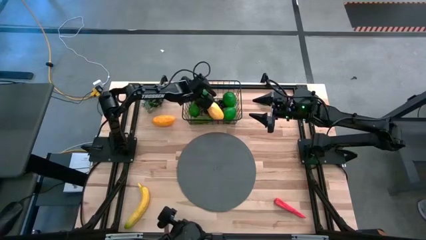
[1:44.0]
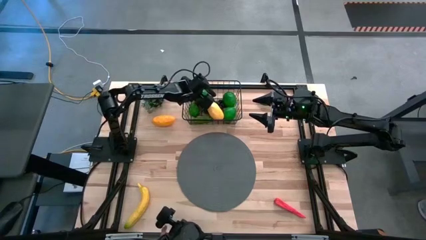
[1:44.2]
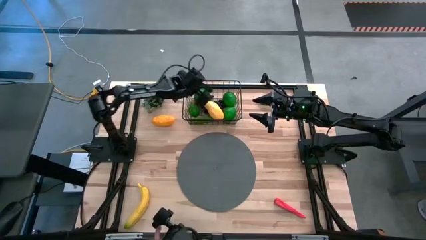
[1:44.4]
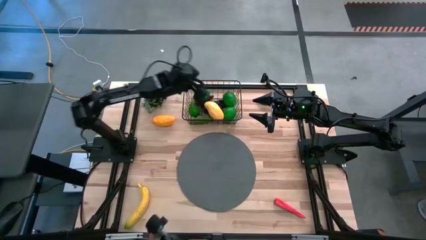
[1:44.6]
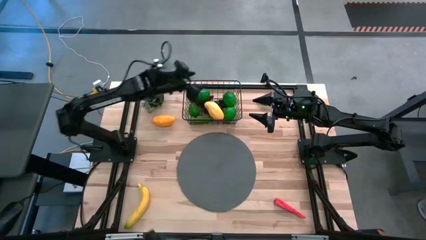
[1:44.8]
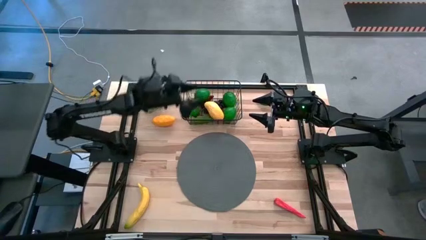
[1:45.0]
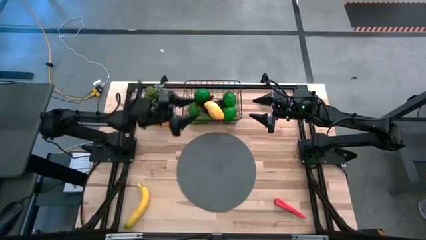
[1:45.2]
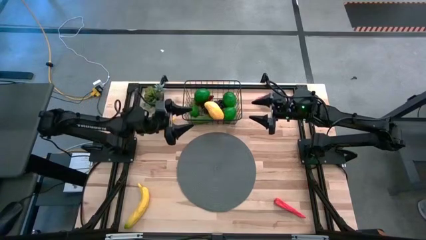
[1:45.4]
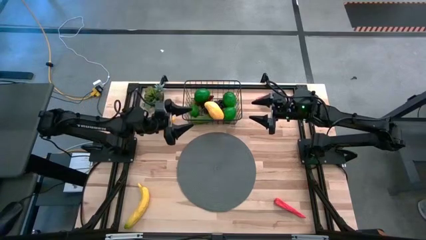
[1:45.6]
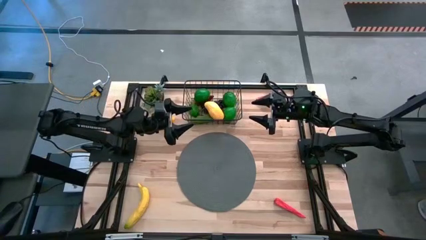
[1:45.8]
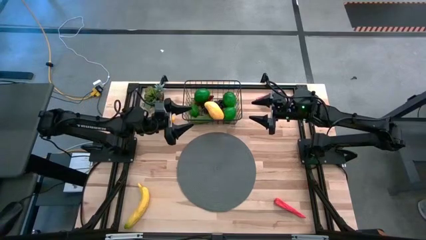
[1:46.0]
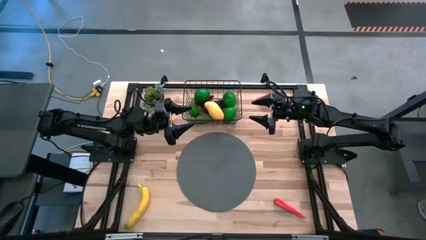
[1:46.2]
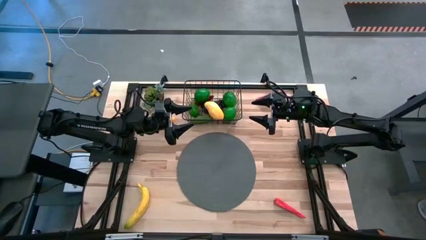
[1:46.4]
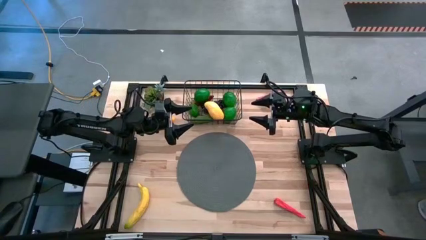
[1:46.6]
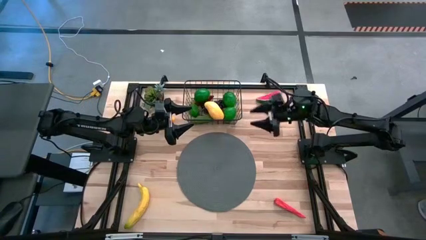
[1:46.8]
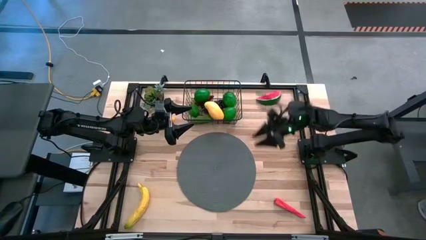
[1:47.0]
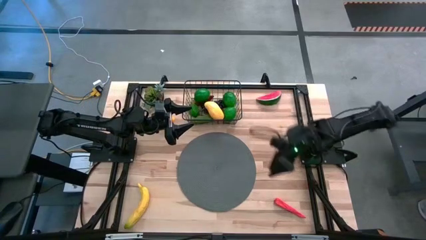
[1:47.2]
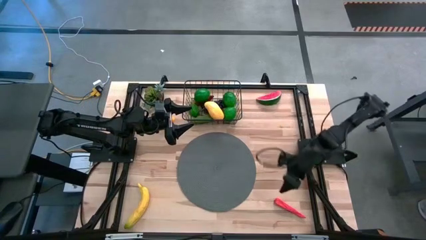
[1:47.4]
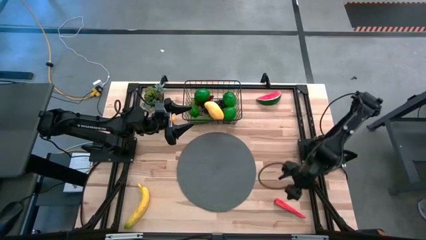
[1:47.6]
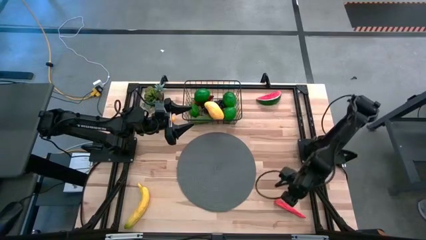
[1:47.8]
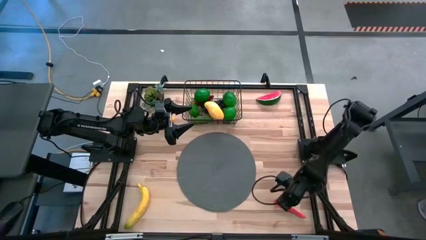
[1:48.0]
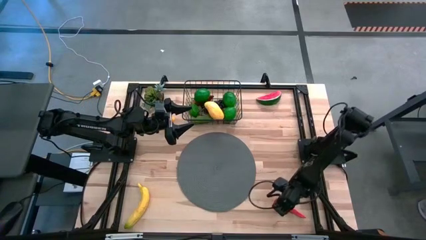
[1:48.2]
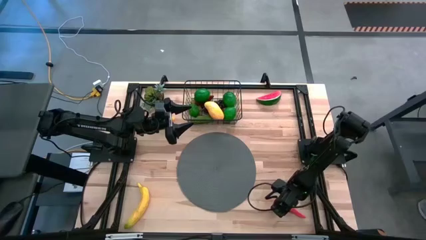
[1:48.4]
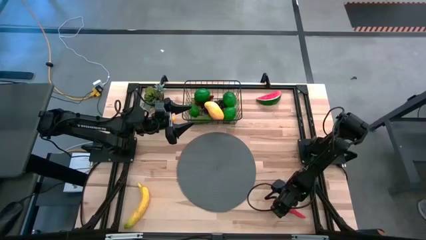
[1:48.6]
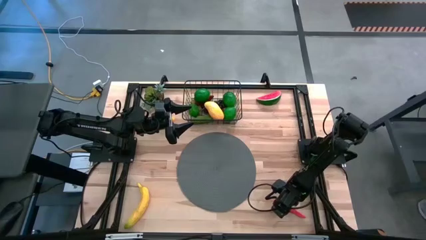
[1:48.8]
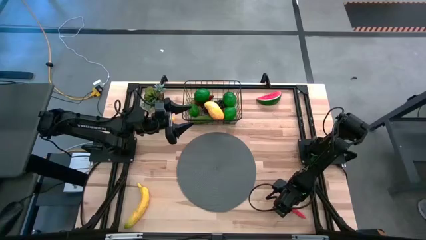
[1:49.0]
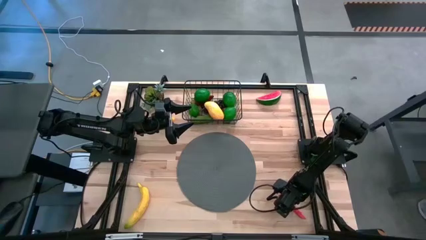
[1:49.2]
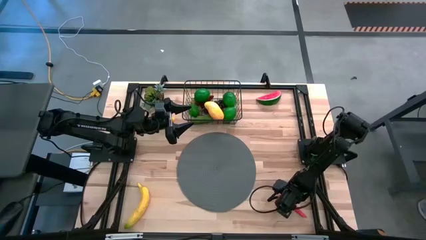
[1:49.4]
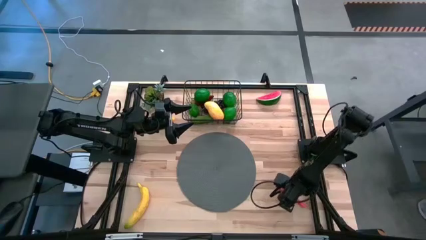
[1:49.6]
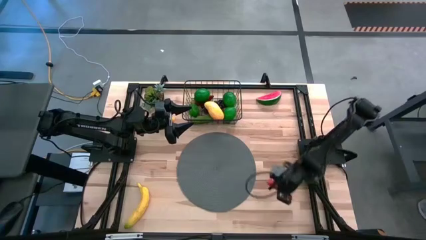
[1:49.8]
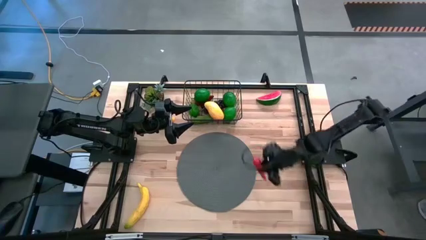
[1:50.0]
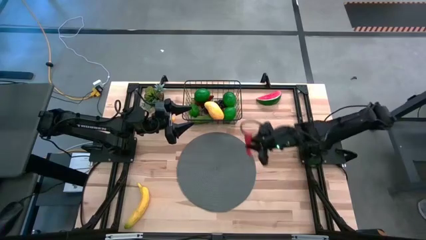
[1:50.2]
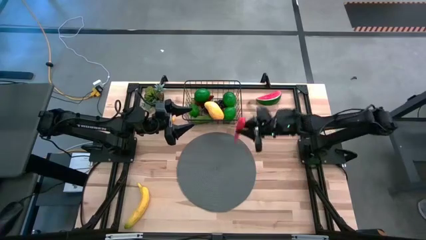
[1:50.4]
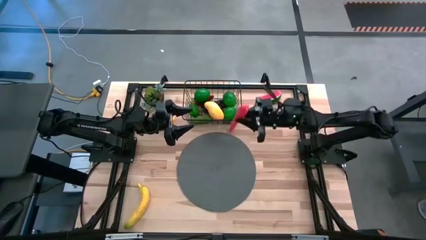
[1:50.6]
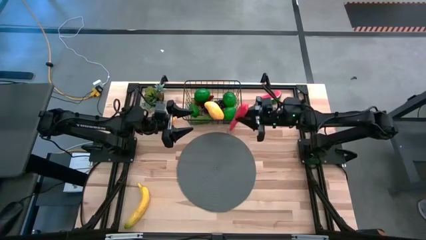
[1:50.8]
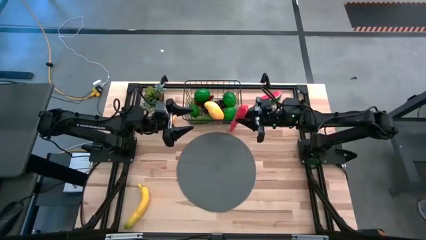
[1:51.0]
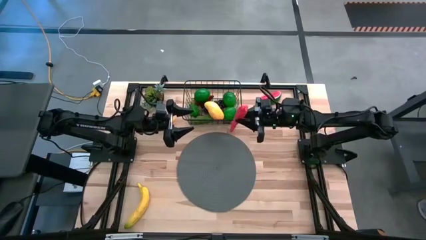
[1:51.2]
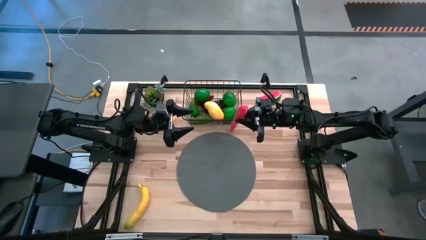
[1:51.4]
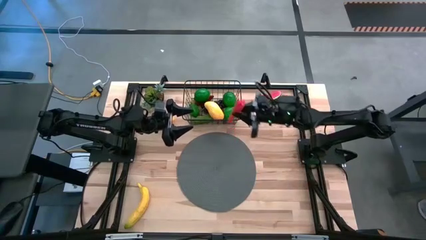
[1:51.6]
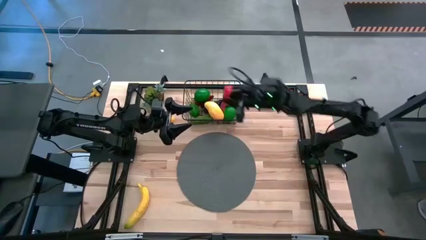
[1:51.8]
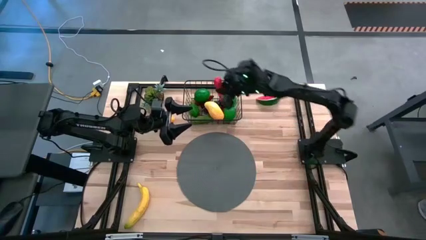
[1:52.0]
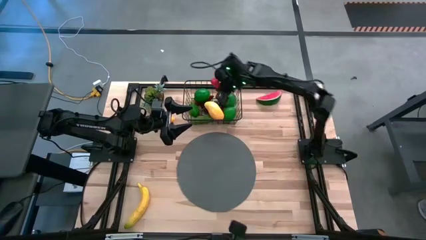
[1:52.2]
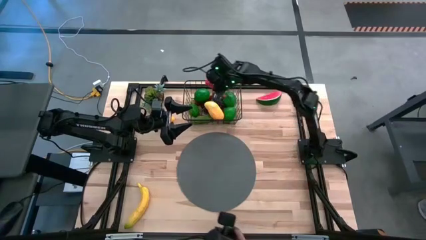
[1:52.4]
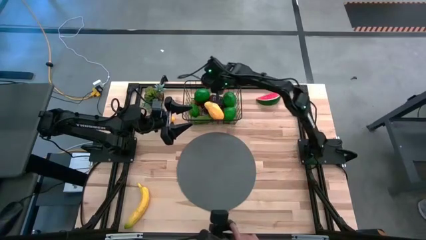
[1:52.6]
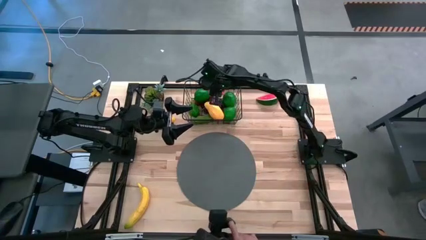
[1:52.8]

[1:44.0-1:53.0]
Task: Build produce basket
Put the orange carrot into the black wire basket

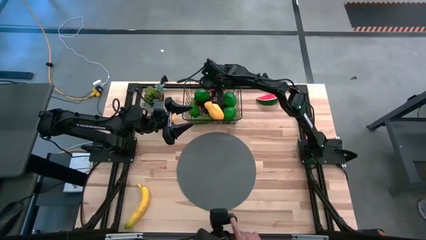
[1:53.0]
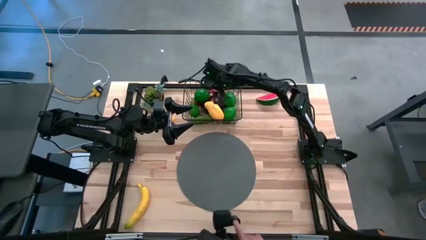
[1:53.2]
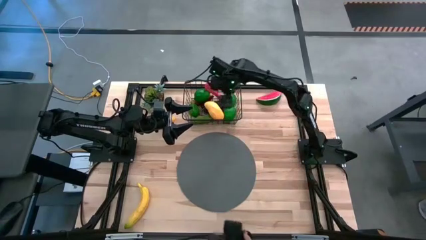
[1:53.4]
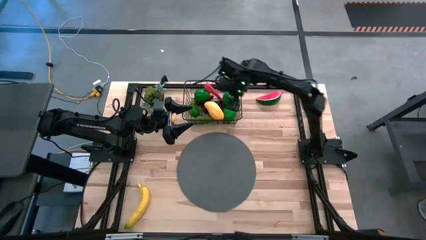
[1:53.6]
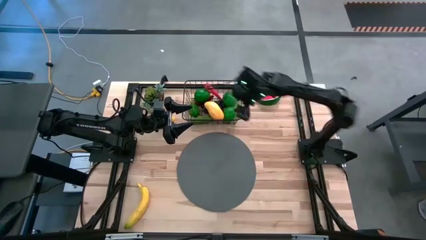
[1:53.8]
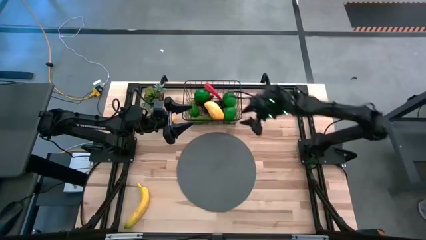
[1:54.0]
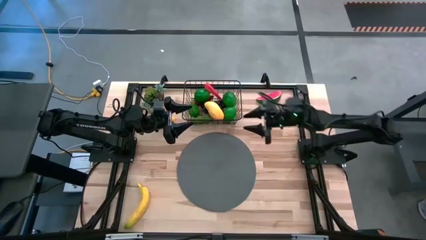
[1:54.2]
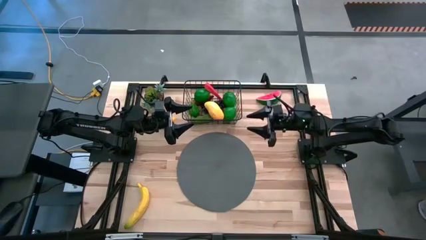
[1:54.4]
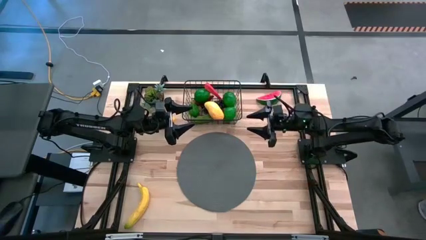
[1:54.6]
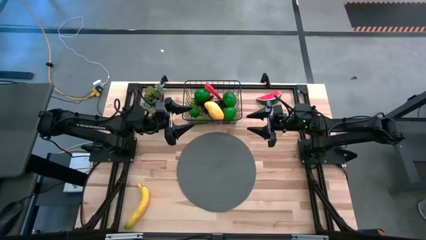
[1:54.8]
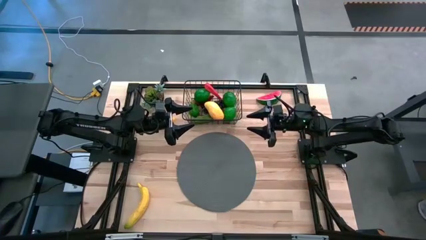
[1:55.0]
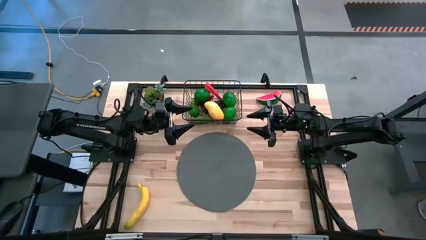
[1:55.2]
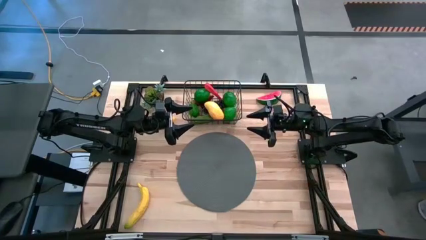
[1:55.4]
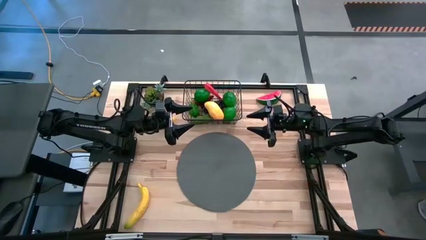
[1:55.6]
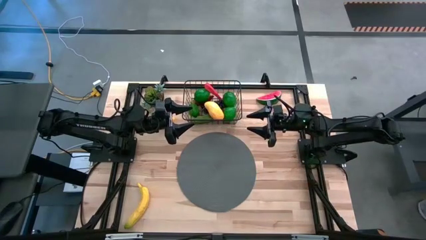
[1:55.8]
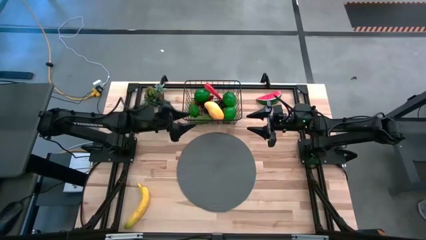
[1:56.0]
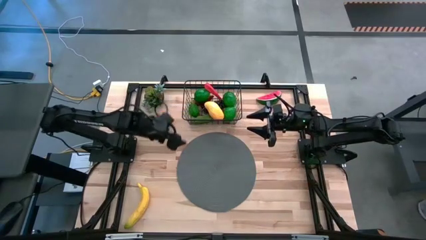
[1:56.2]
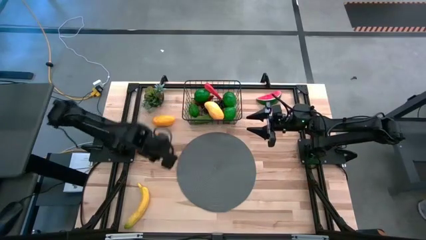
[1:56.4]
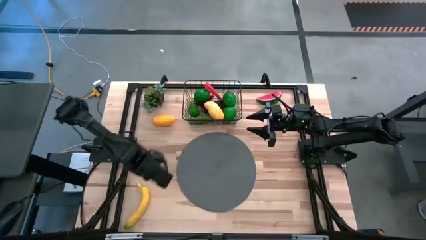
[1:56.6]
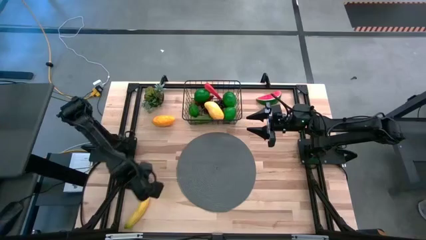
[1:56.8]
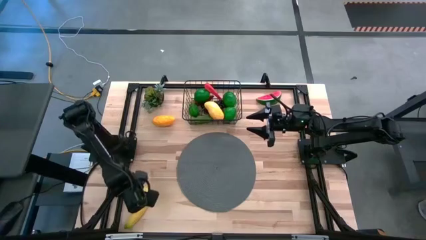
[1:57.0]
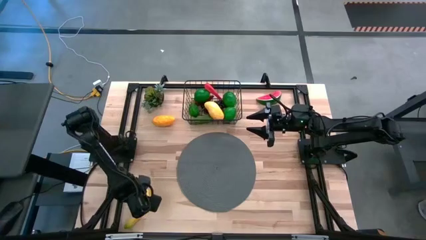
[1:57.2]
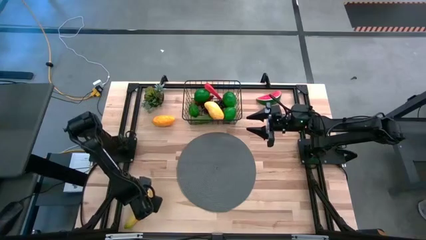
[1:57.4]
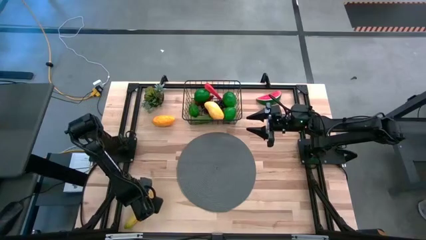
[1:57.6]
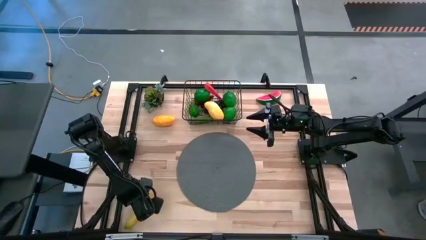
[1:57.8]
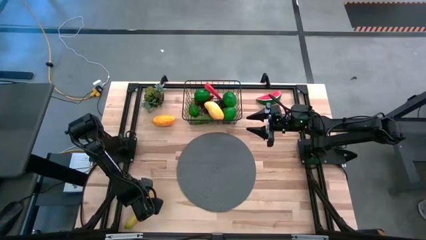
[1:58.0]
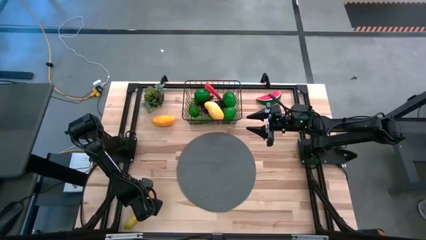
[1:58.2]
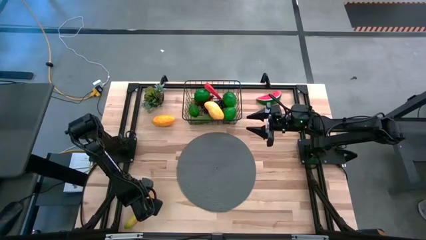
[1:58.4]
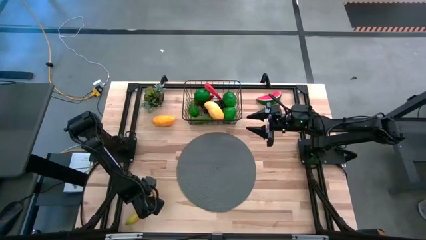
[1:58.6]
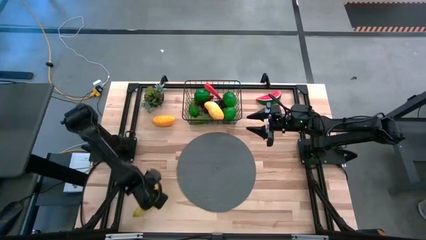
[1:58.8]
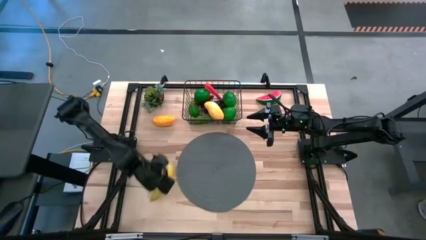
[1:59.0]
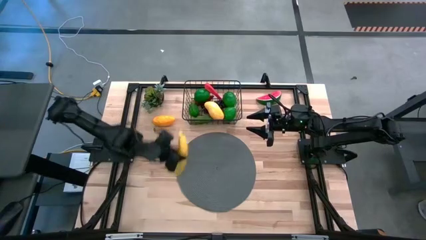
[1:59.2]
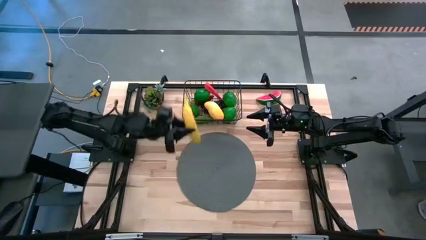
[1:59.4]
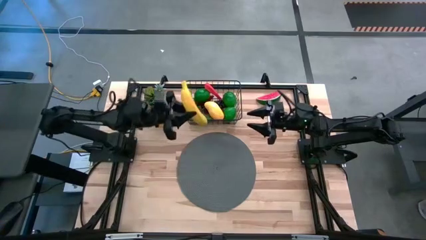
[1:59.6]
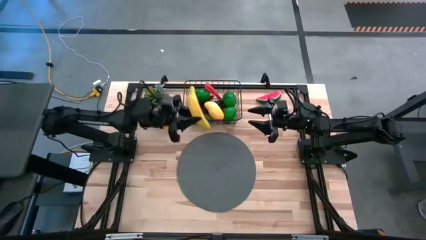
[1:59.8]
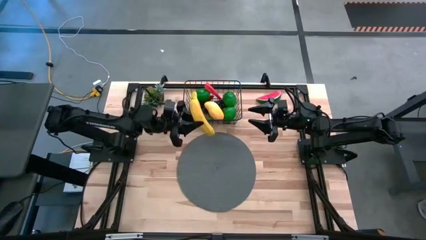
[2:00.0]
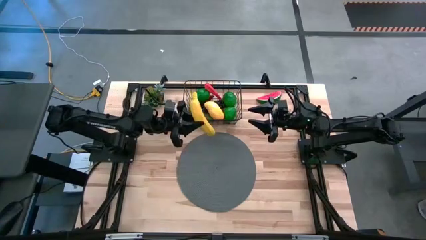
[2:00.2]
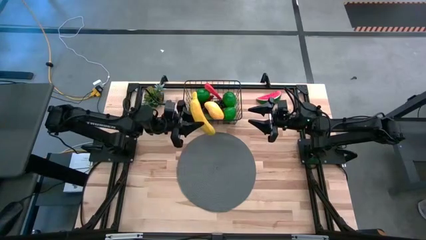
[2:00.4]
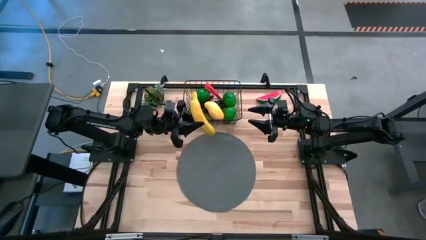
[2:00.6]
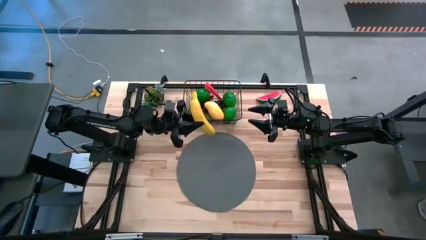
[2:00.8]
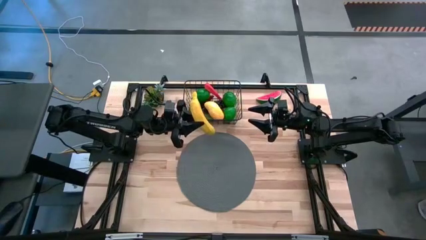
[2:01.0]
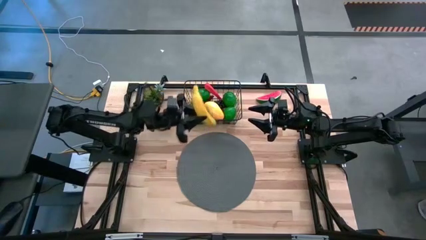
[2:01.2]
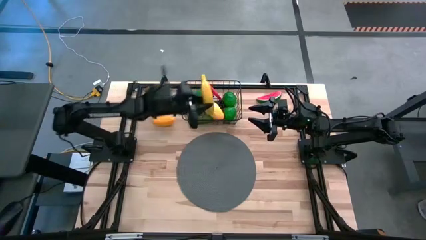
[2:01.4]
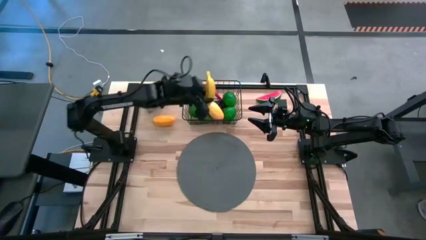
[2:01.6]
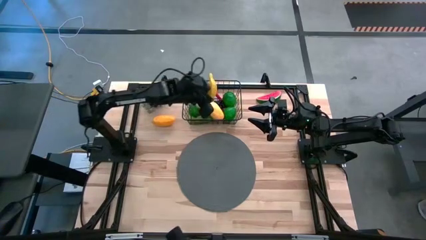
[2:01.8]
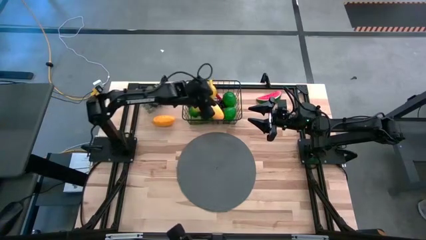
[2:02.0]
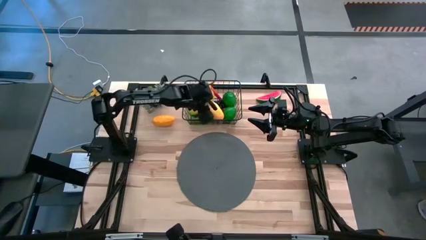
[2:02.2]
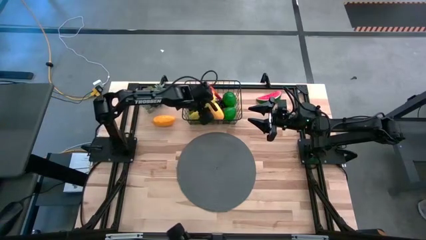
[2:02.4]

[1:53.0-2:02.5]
Put the yellow banana into the black wire basket
